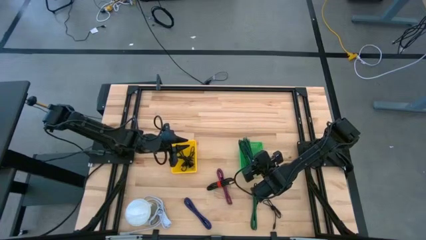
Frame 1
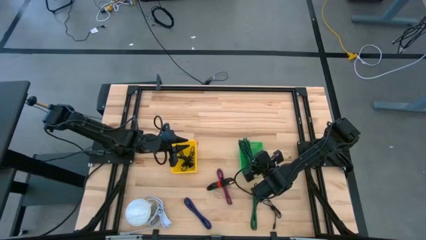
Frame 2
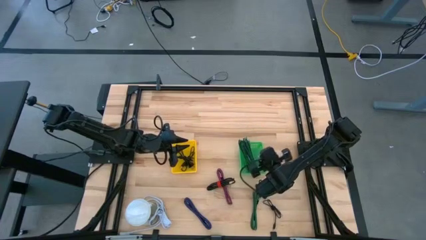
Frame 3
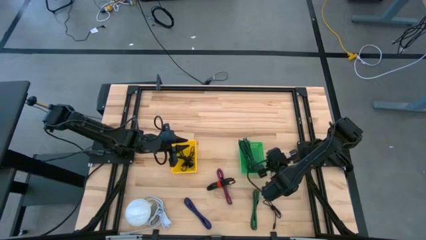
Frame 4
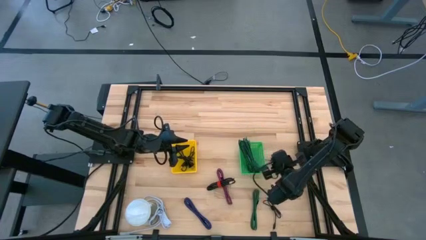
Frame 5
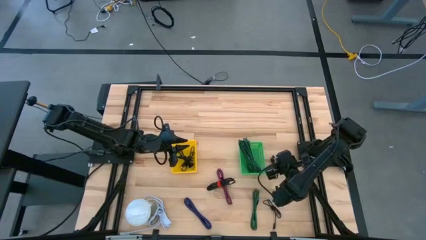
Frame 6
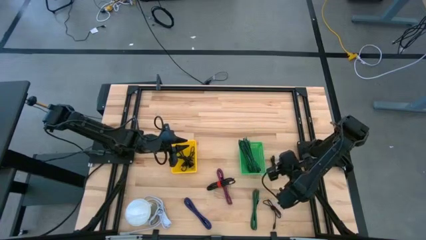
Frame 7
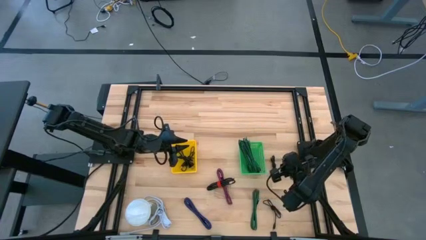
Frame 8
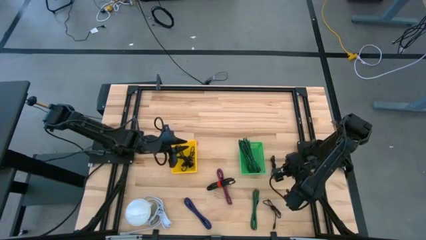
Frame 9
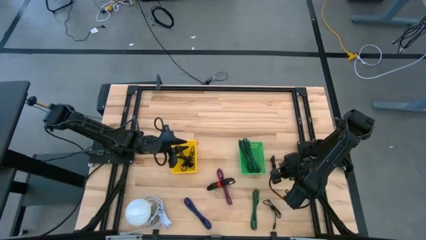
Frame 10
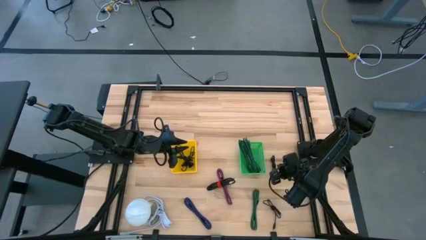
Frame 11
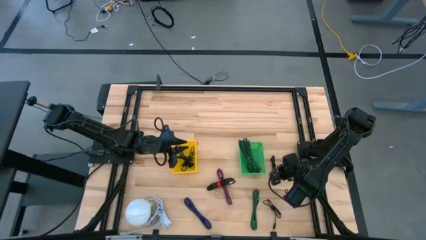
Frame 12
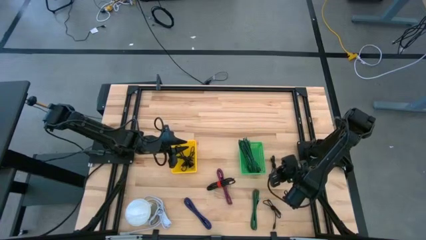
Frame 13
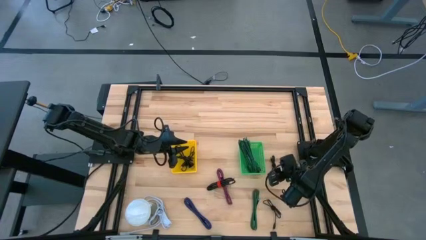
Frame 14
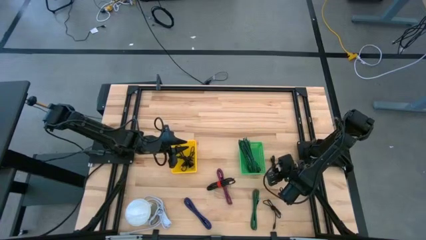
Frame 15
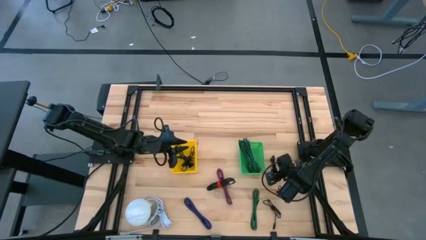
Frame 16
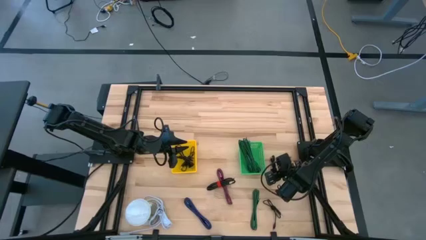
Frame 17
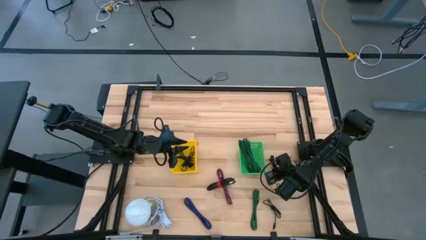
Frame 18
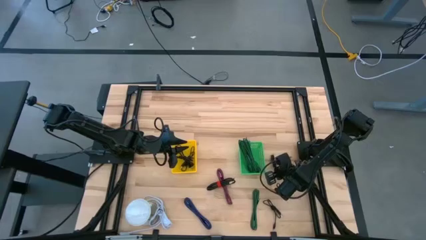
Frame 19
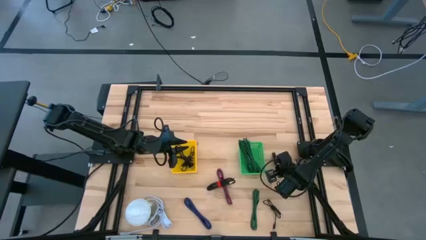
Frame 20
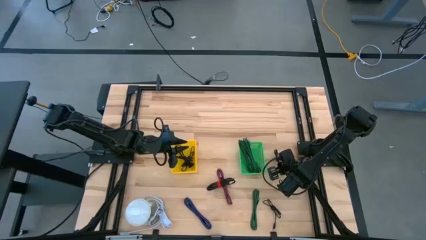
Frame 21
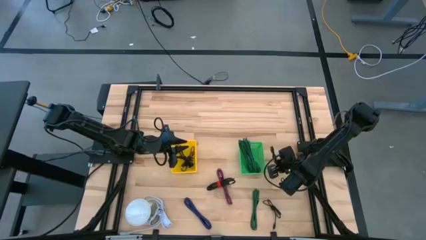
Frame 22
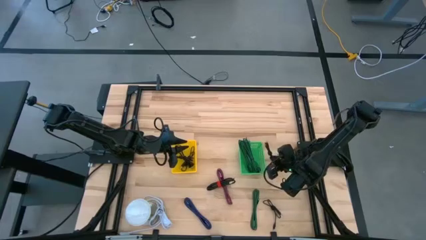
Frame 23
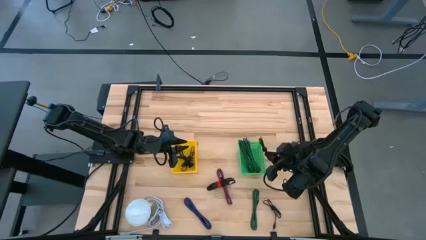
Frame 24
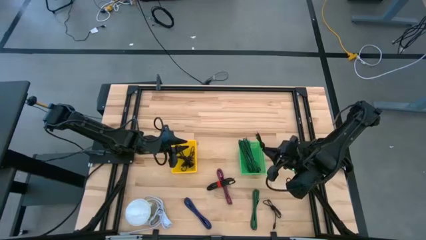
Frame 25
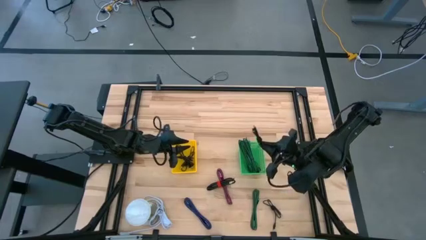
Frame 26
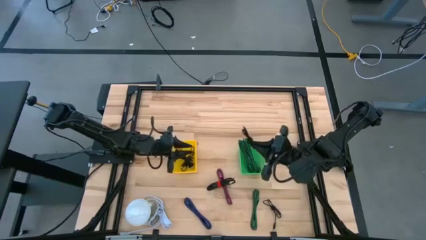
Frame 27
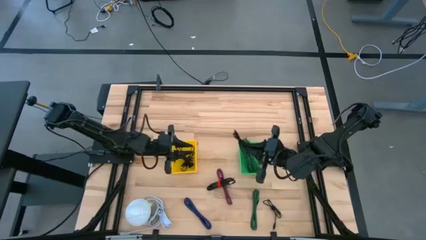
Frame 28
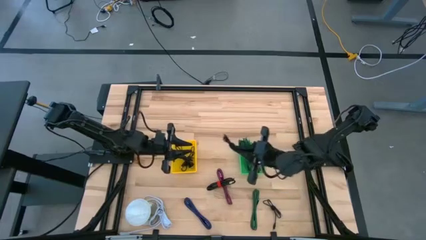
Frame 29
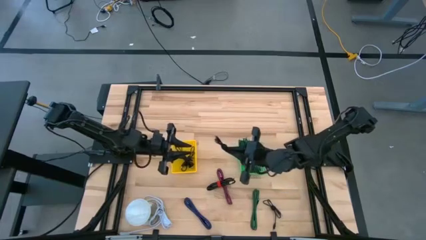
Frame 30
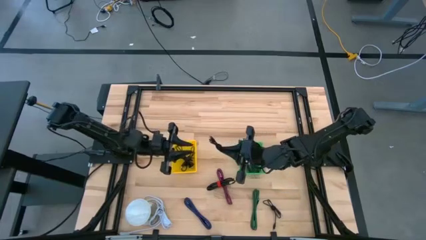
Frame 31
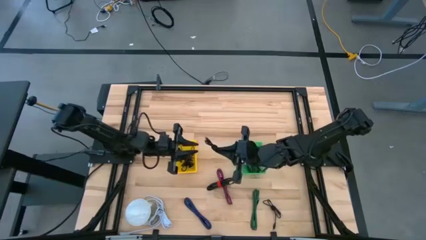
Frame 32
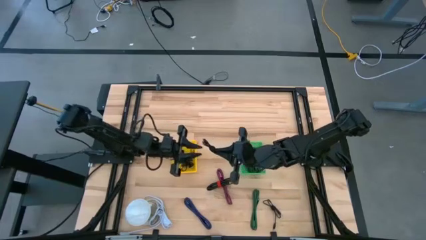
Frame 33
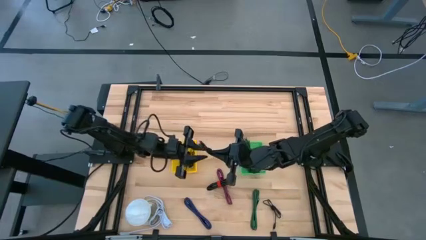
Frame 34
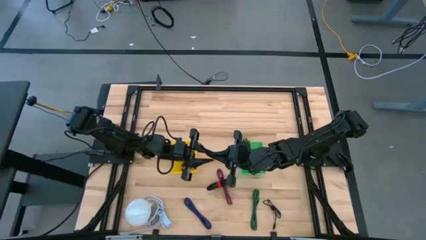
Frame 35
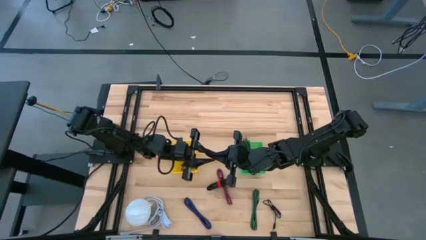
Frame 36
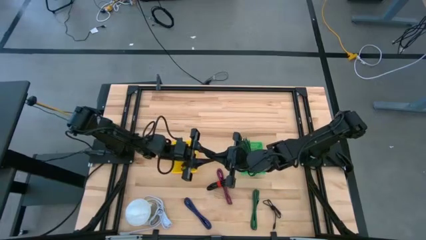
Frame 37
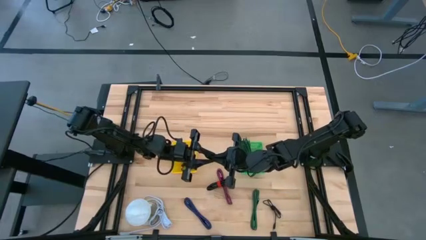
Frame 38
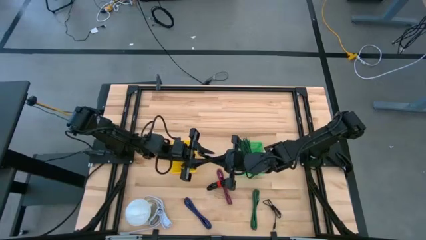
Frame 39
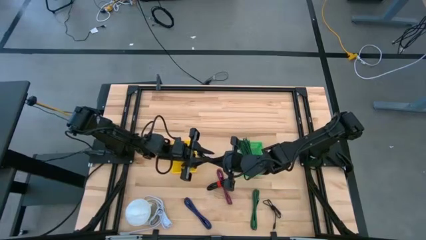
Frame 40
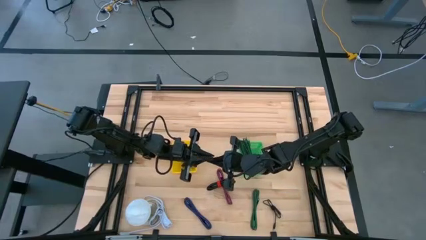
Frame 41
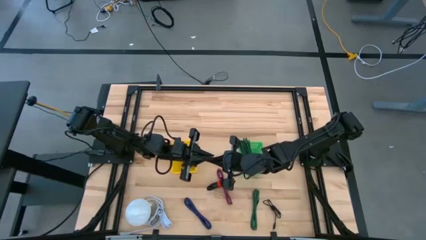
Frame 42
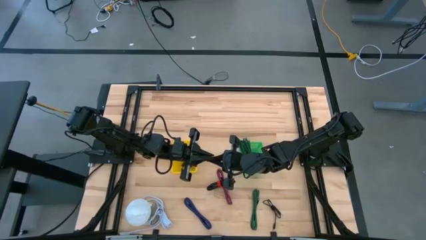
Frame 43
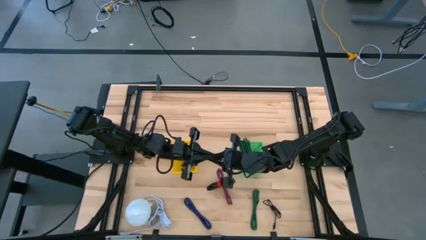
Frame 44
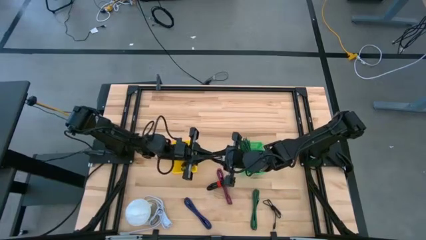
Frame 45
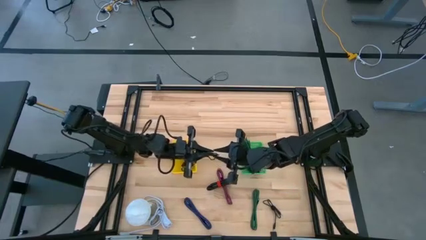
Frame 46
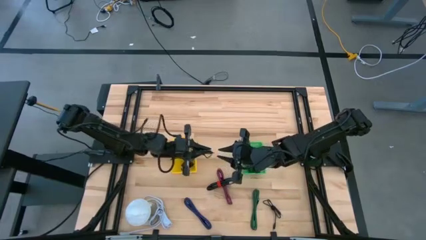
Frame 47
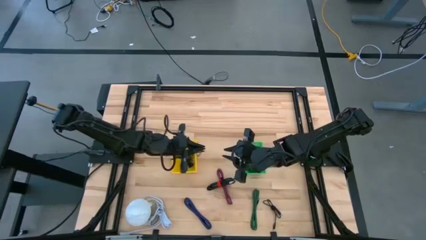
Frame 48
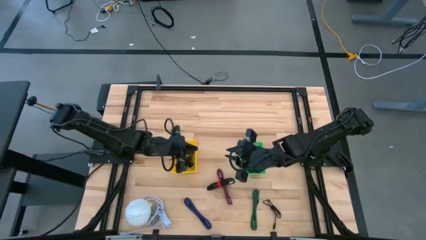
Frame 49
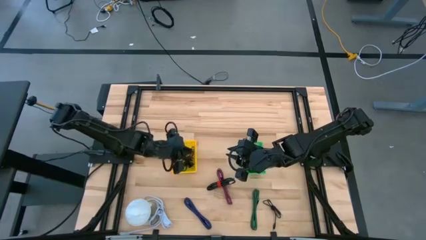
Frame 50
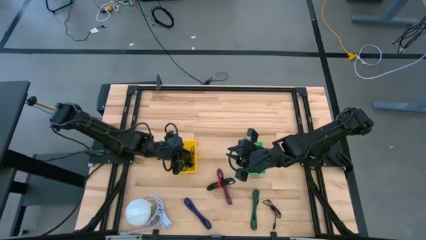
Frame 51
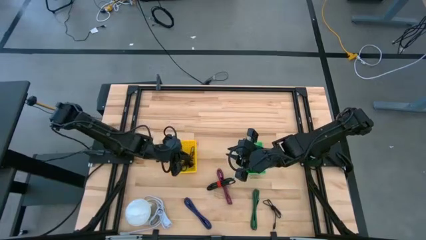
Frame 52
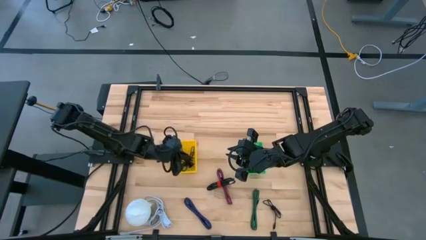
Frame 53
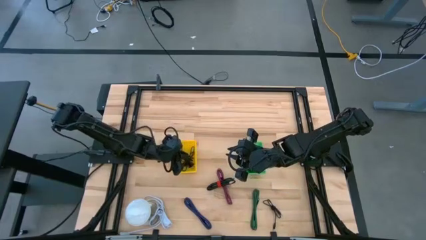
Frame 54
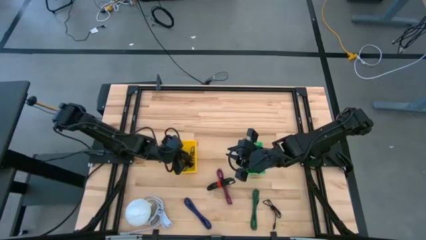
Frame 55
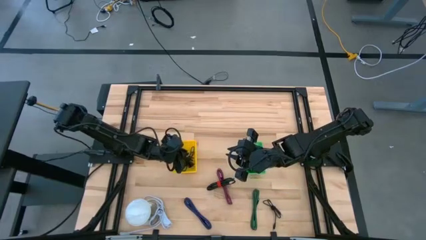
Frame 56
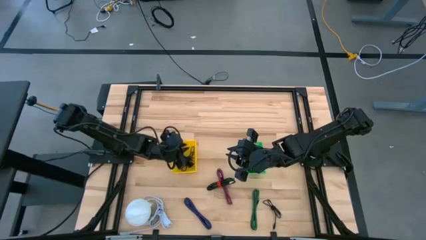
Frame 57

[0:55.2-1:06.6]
Task: Pick & Place USB Port
Put the black charger cable into the yellow bin
